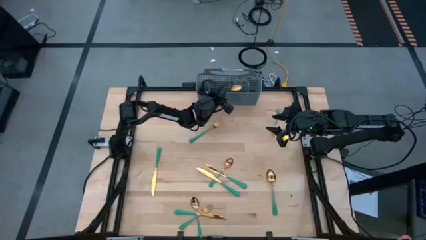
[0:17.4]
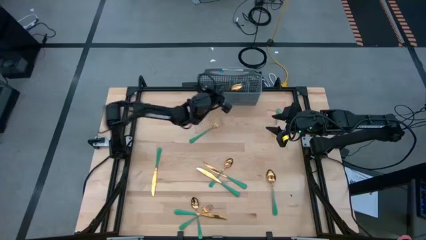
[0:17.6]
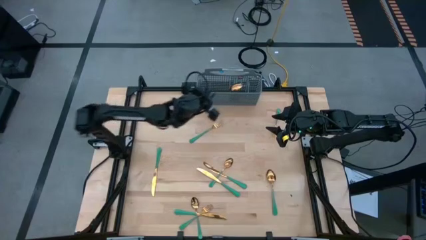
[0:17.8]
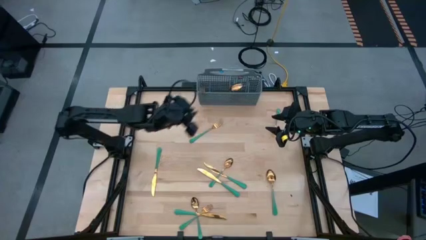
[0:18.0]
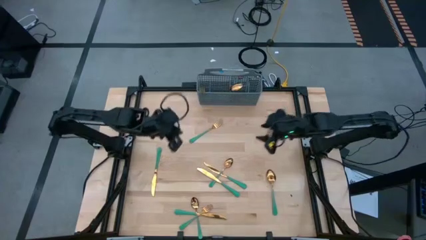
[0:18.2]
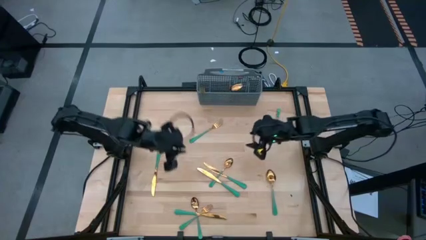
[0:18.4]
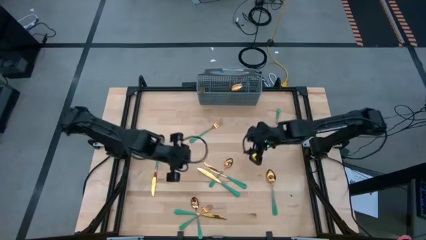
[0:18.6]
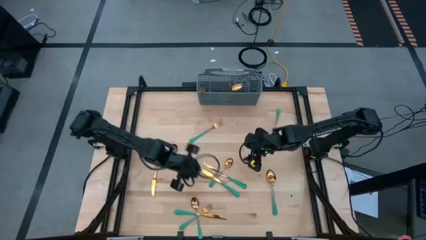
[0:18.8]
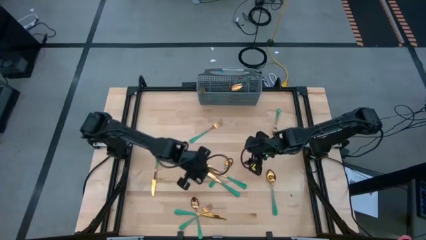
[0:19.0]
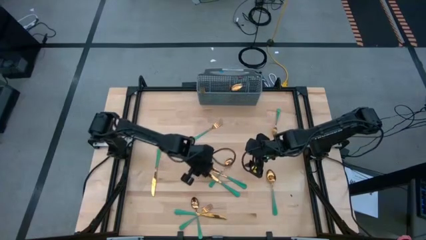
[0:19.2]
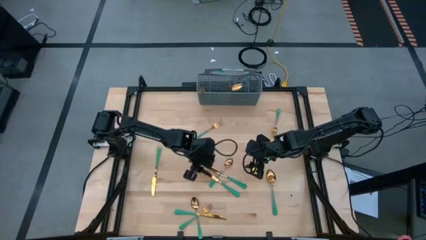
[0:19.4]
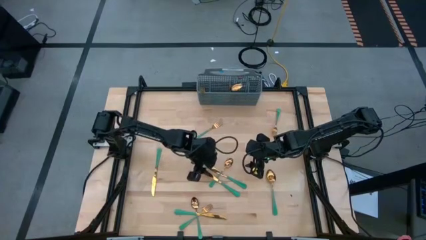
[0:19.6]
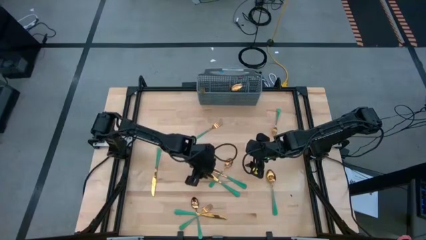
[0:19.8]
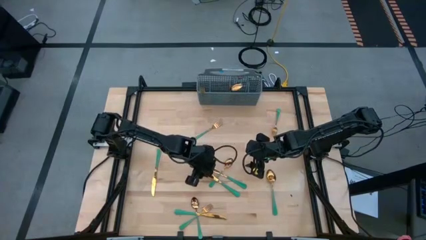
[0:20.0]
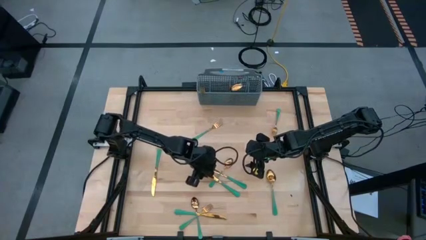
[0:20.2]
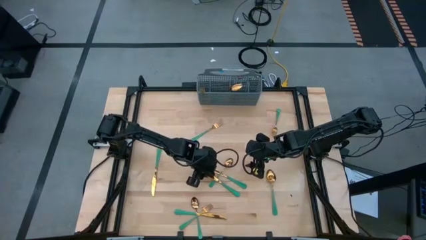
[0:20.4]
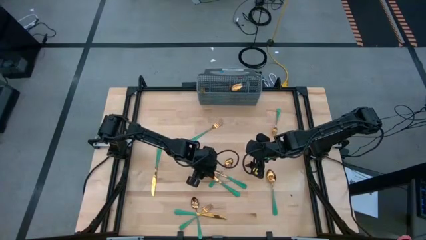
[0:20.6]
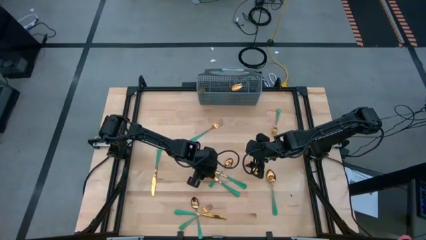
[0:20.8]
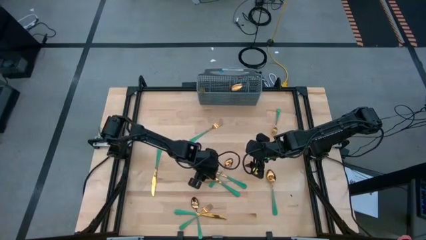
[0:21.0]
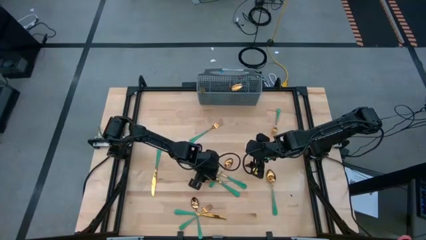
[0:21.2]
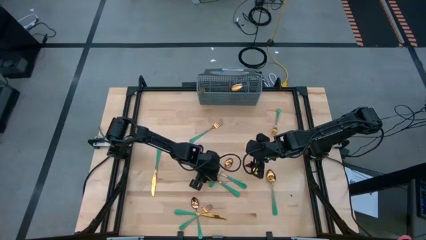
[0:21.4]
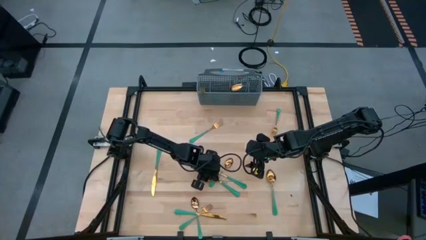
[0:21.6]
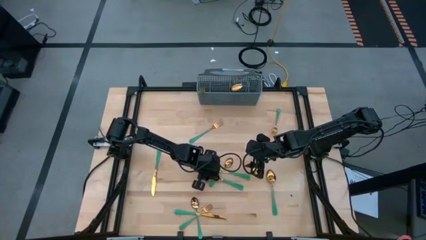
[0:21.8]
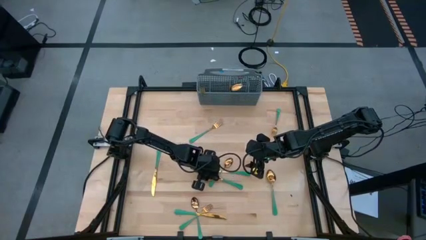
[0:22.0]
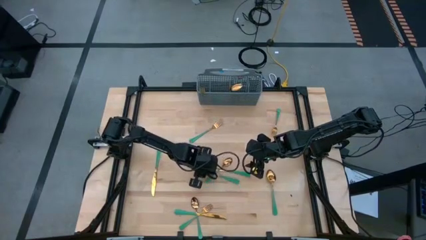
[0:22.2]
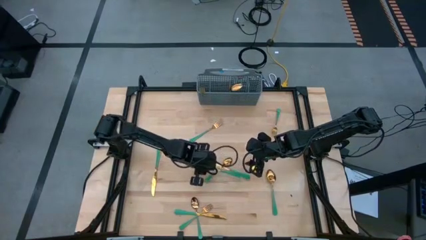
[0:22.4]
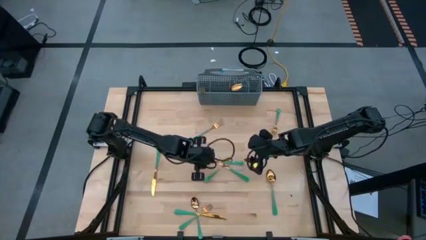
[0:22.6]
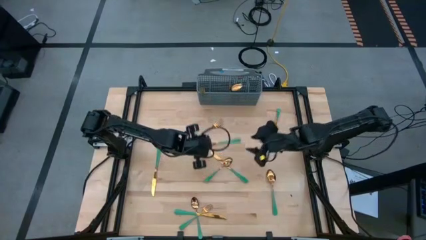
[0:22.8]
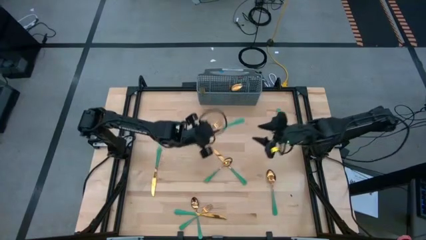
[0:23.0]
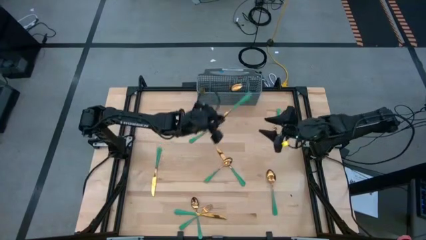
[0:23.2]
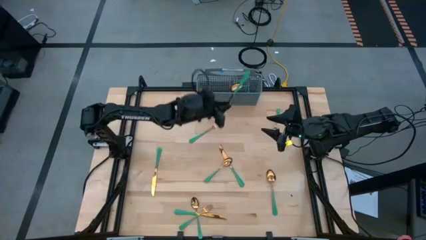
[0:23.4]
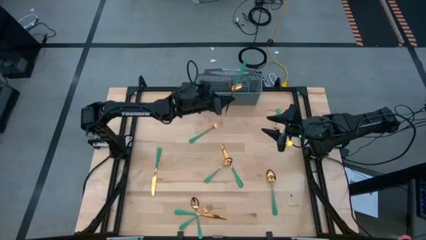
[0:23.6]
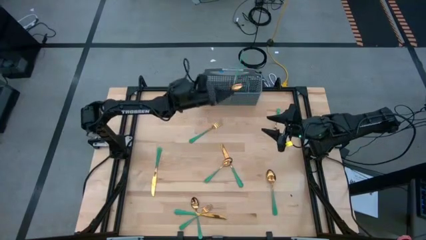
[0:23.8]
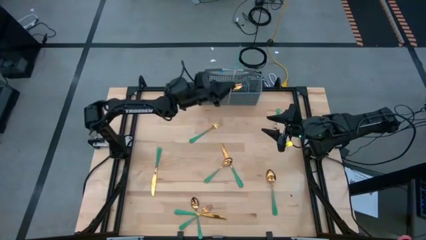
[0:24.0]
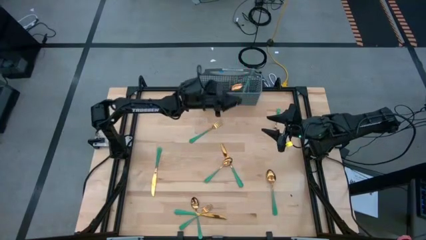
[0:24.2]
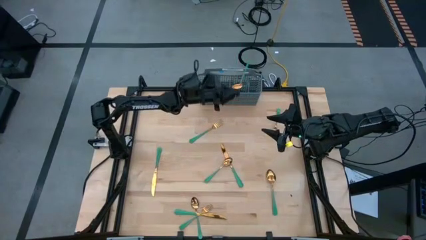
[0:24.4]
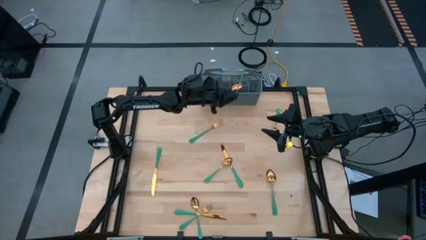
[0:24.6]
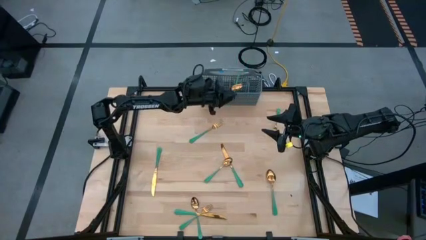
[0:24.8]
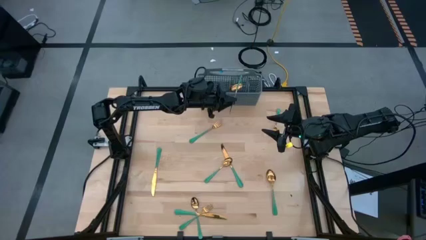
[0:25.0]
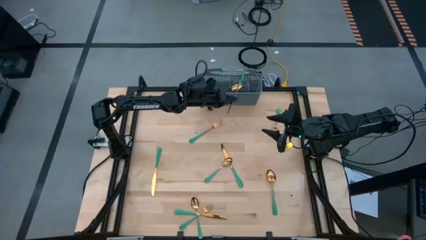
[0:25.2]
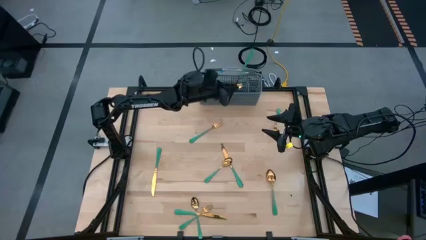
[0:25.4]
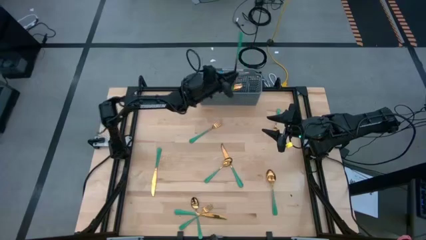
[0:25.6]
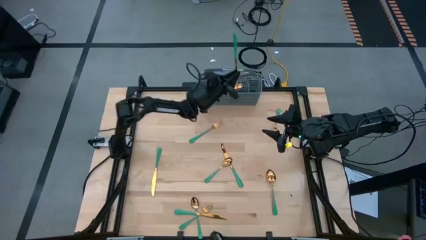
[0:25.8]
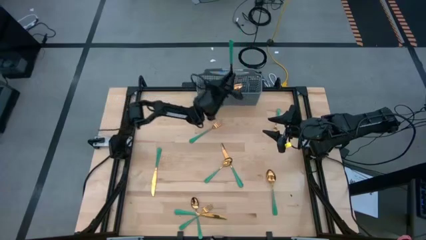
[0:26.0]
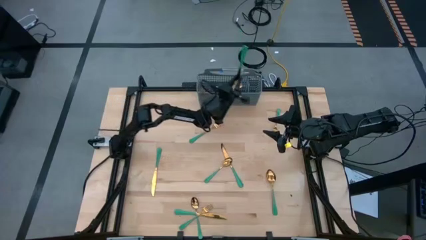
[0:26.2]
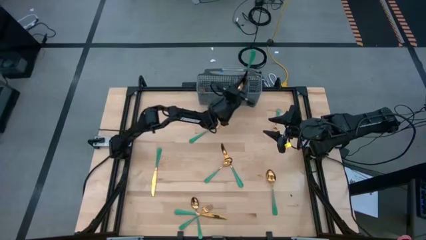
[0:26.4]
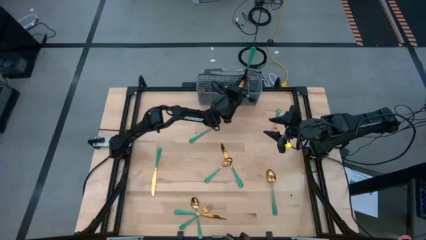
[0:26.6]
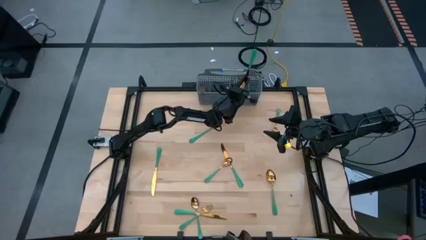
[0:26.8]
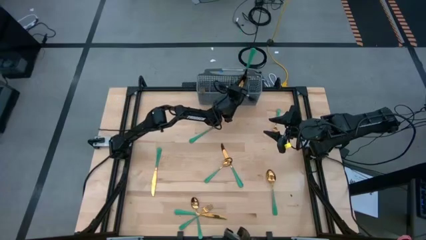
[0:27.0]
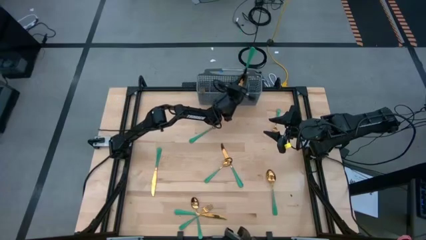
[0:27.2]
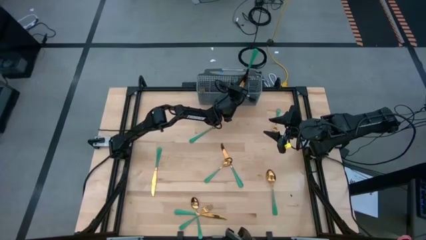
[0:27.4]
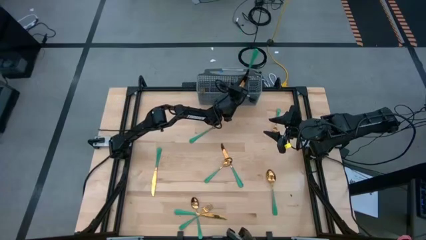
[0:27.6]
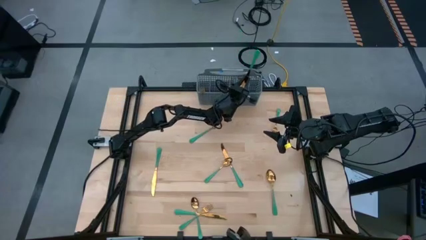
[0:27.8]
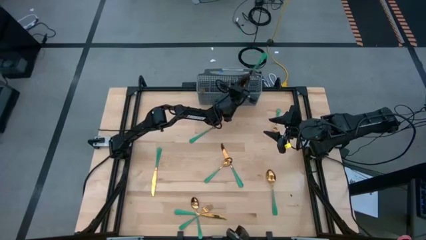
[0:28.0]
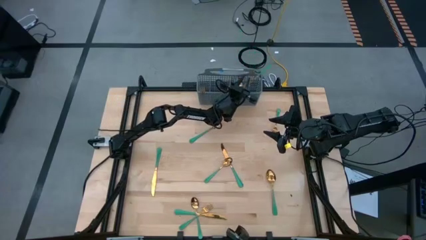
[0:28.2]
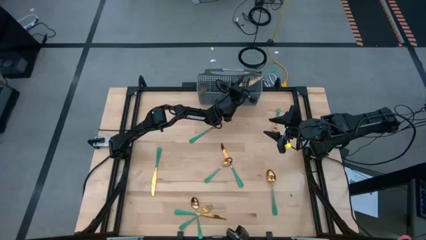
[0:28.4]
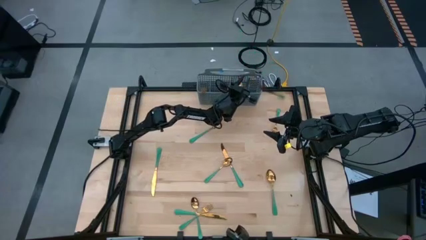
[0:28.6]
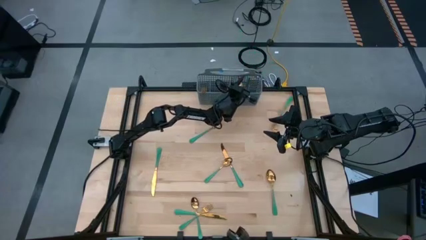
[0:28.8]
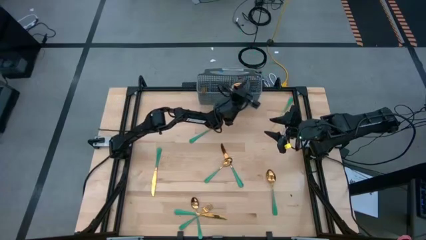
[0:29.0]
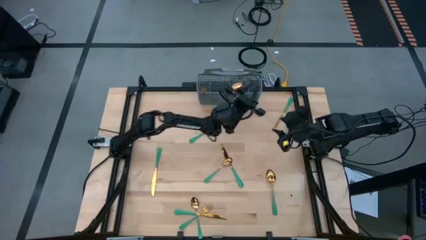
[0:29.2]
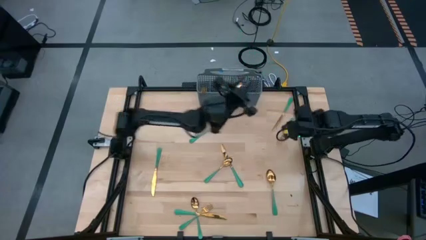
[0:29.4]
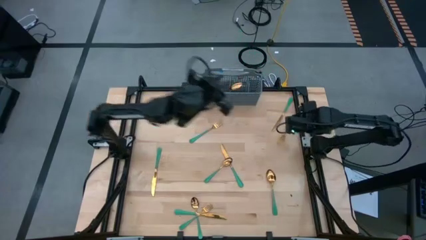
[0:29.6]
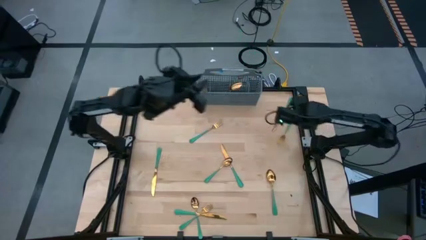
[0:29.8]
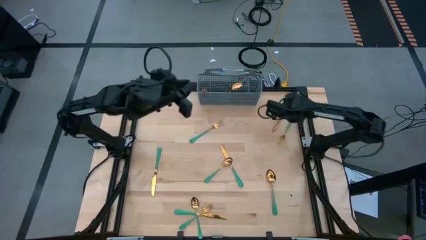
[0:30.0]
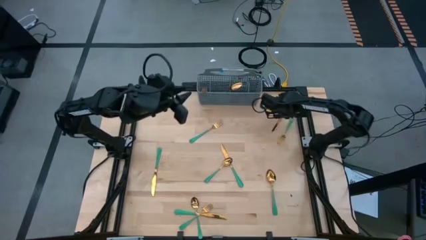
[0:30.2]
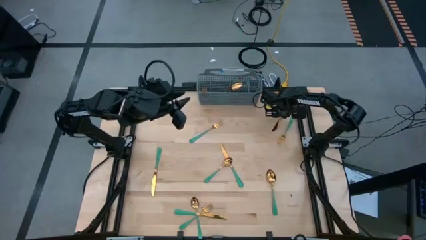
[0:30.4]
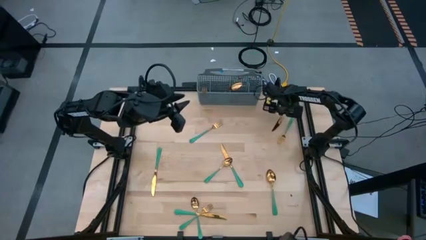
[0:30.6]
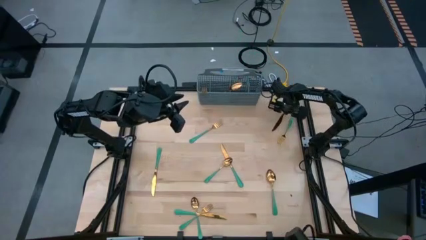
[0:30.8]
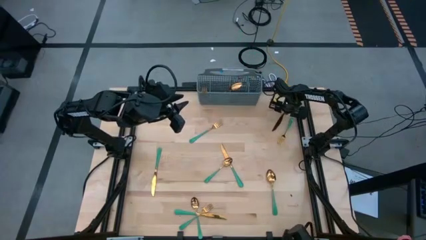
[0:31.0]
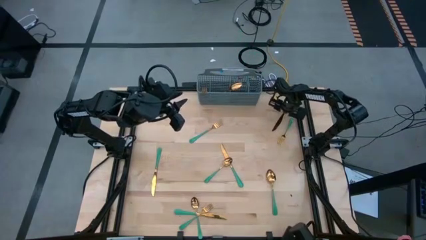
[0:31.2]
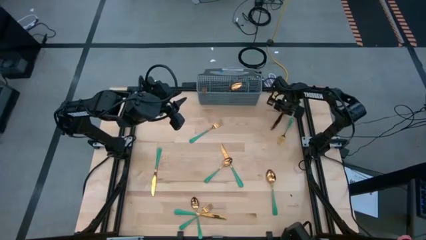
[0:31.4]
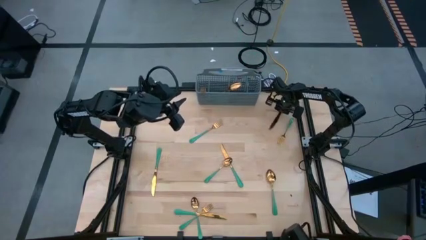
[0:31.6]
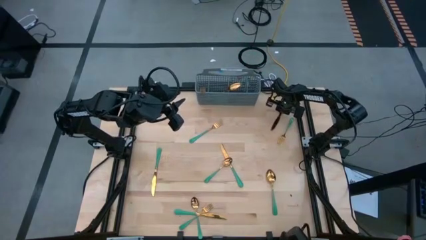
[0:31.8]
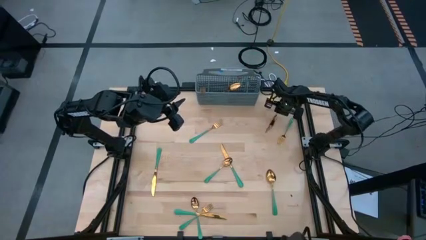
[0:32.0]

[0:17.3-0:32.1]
Task: Sort silverware
Put the green table knife into the gray silverware basket

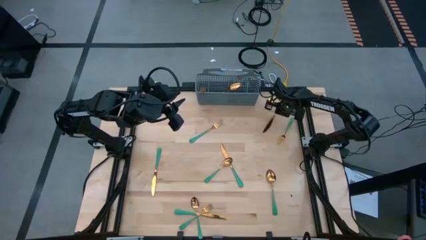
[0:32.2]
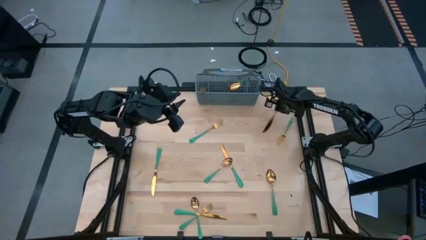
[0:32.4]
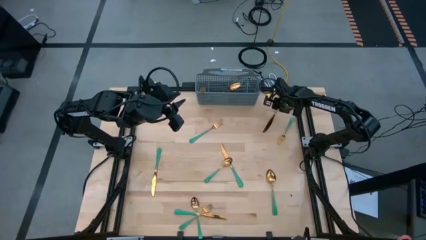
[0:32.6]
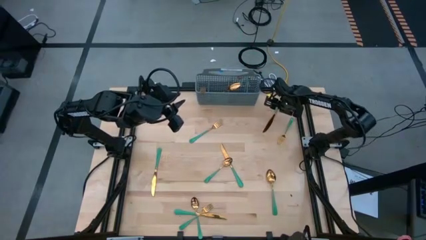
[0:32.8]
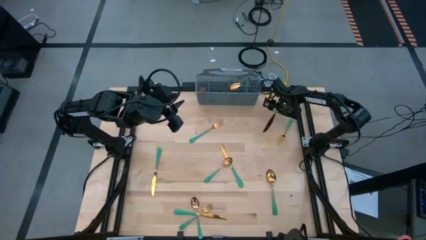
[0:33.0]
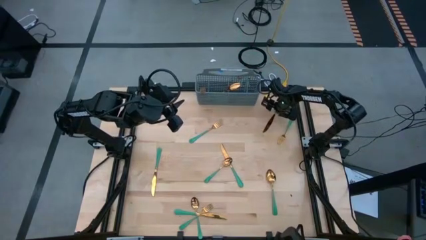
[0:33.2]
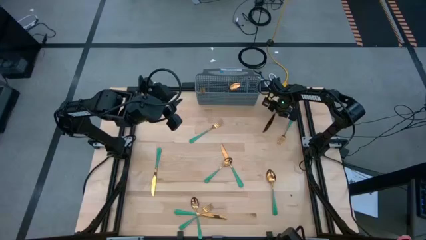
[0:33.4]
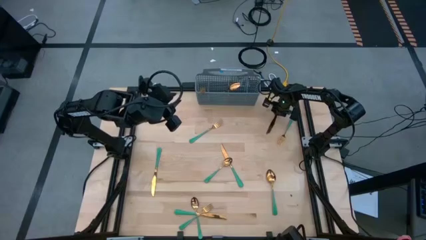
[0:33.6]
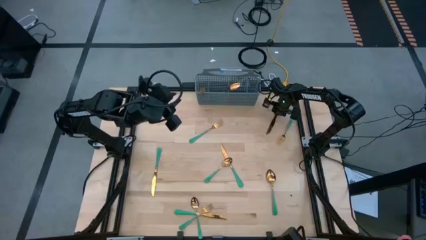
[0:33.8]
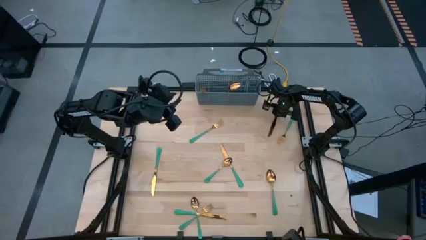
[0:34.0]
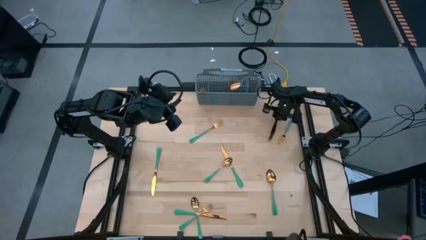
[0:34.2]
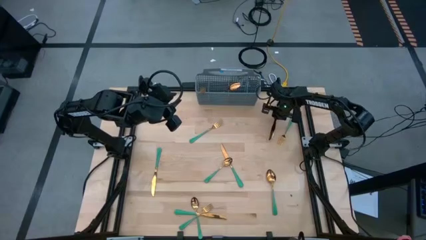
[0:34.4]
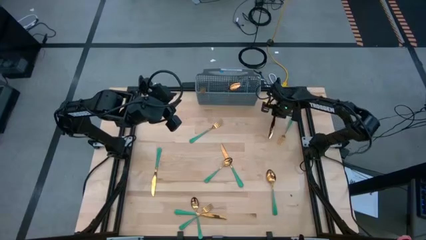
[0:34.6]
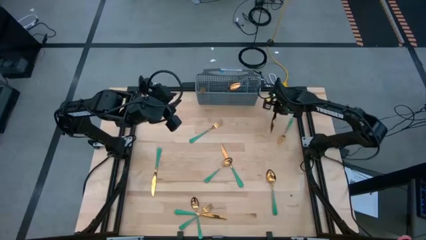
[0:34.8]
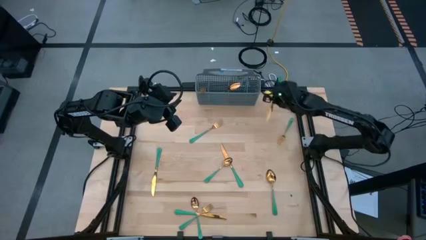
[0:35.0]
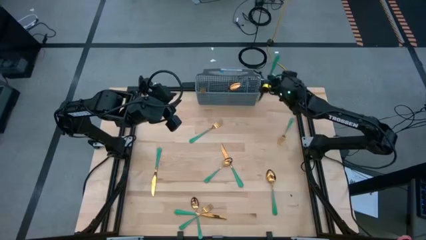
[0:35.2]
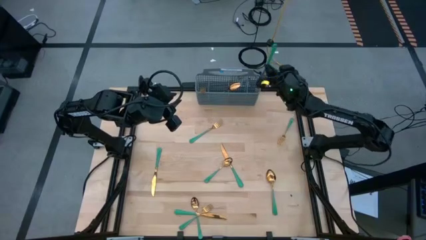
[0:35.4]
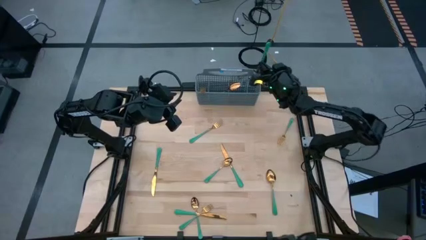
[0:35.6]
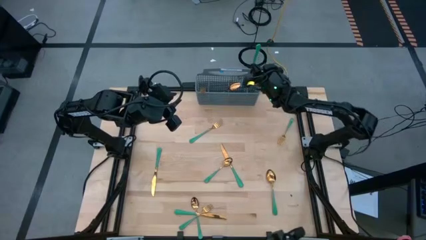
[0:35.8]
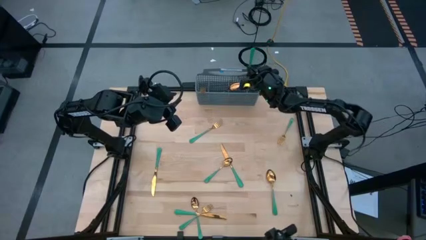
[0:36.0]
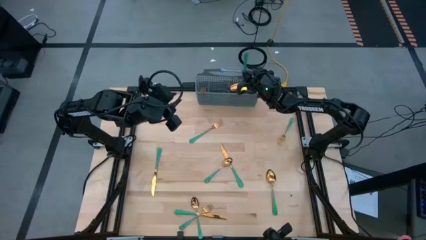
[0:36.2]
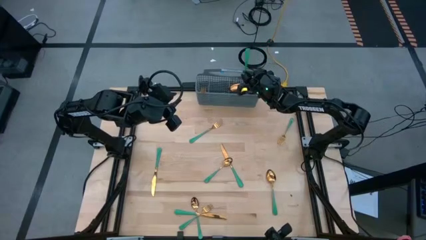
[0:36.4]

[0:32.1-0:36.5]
Put the green table knife into the gray silverware basket
